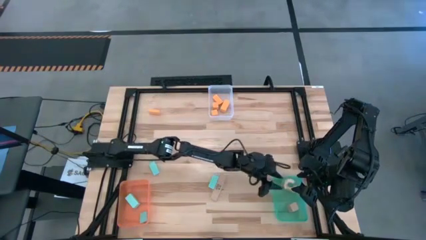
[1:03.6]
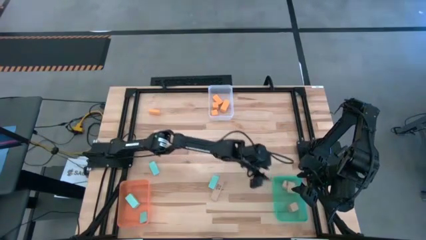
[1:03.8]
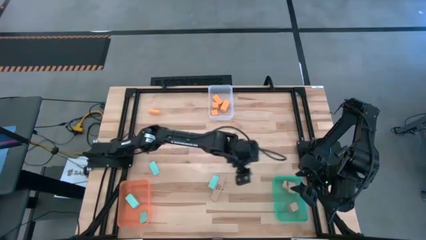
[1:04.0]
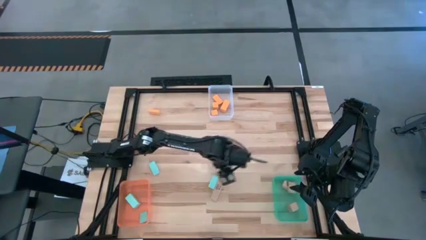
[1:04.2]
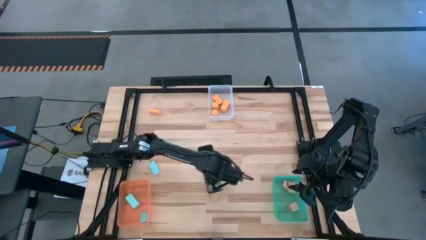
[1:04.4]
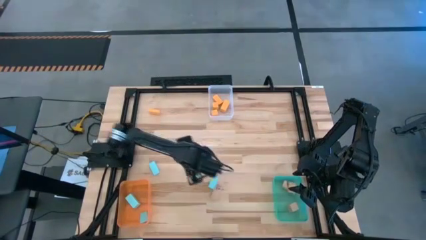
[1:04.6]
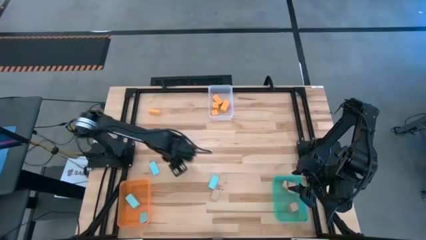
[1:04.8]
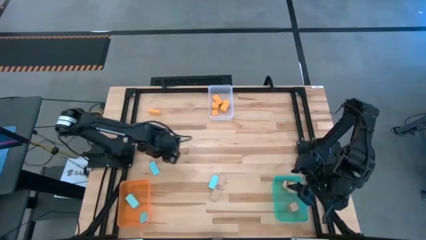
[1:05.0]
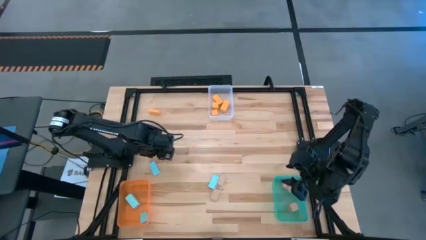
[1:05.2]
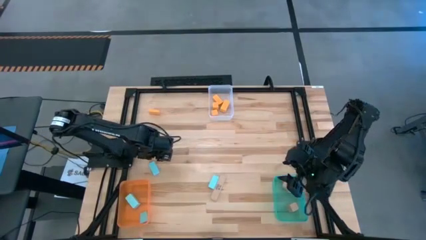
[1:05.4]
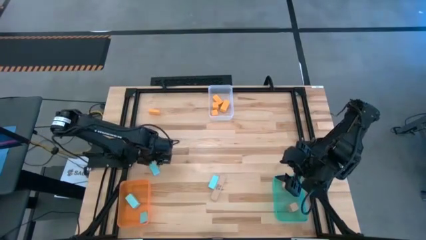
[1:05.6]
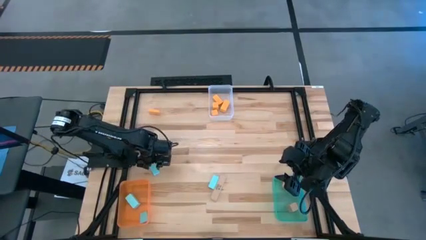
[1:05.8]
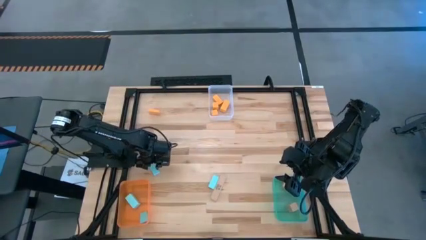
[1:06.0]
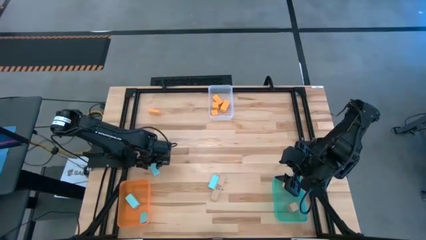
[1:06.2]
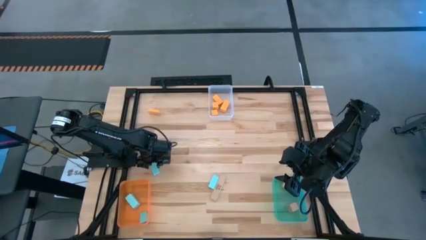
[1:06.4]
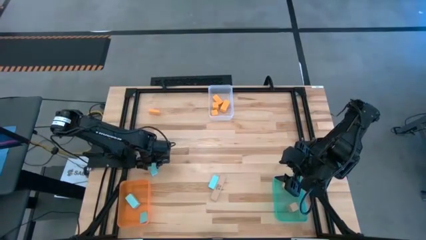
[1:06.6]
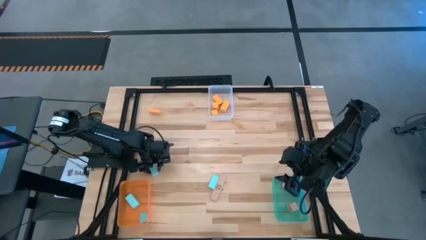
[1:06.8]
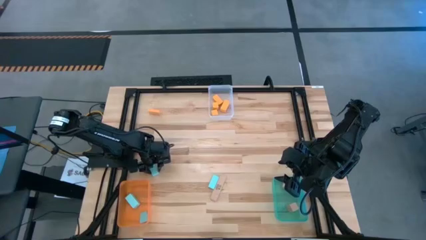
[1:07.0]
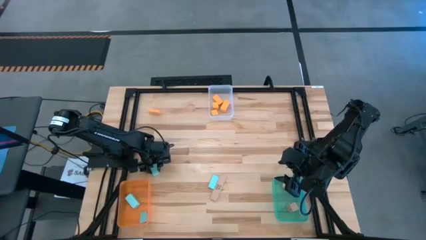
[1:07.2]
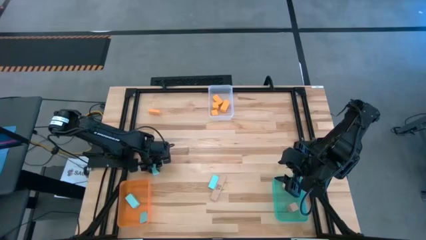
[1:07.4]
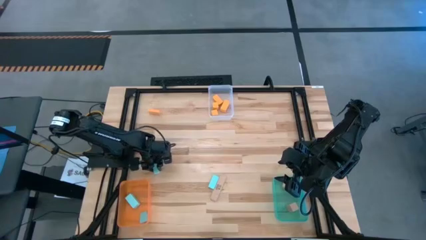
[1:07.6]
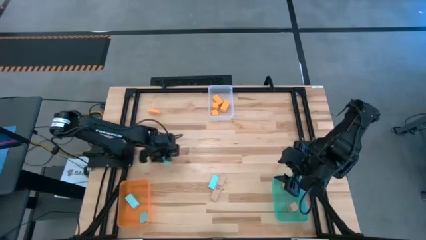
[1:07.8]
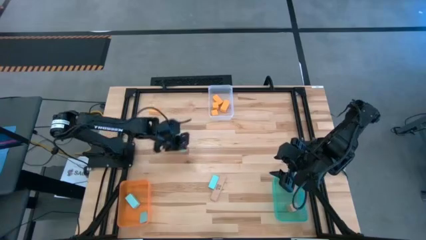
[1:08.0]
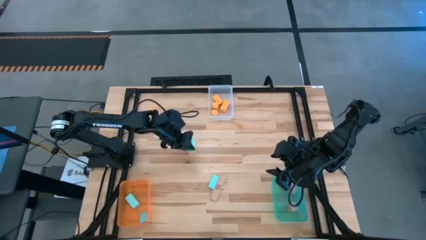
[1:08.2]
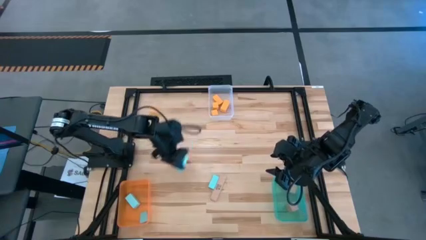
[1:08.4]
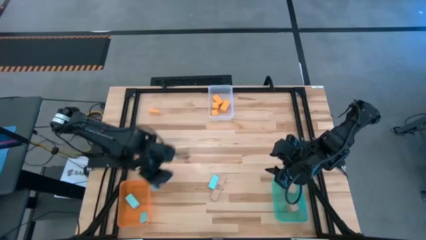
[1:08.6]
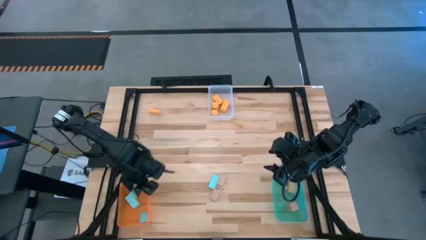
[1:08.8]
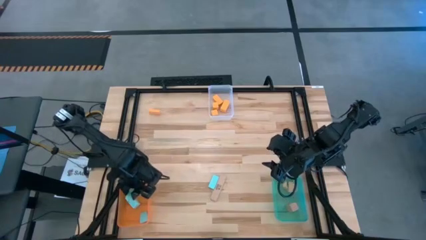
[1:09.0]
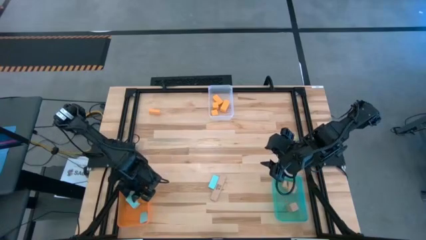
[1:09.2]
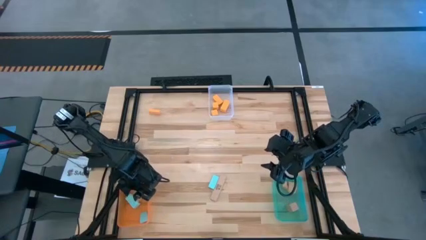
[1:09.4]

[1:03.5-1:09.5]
Task: Sort & place blocks by color
Put the sky blue block into the transparent orange bin

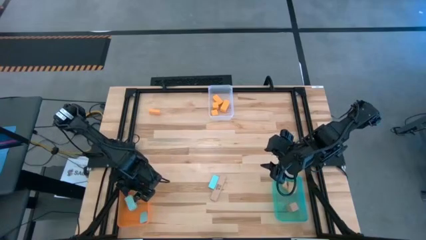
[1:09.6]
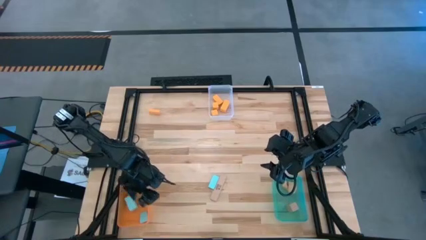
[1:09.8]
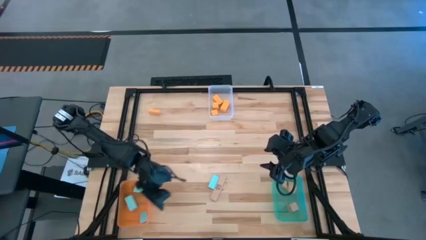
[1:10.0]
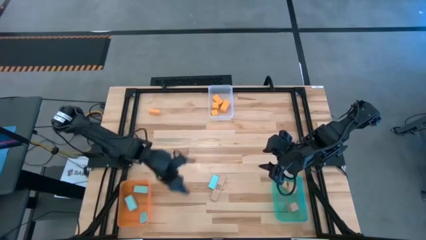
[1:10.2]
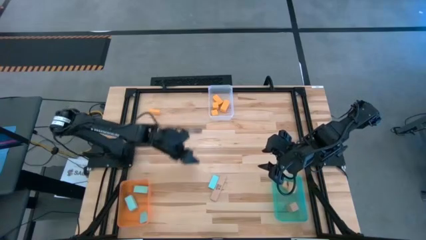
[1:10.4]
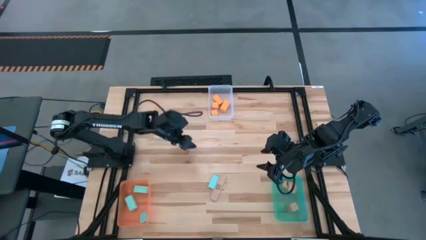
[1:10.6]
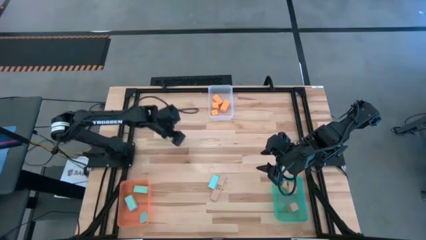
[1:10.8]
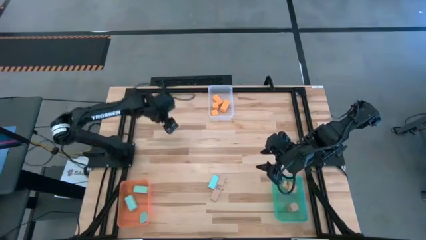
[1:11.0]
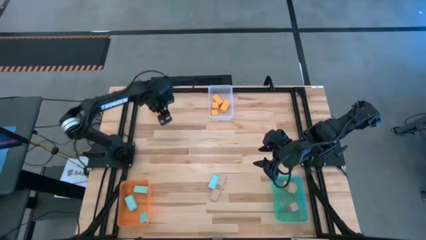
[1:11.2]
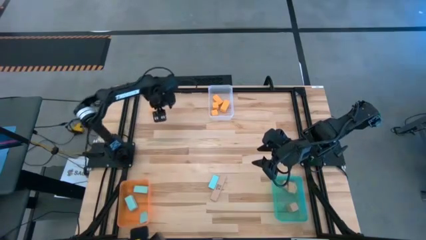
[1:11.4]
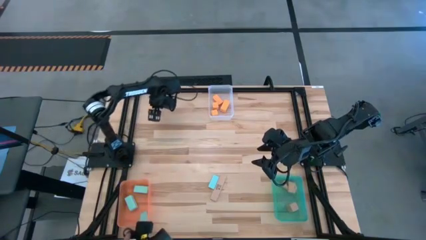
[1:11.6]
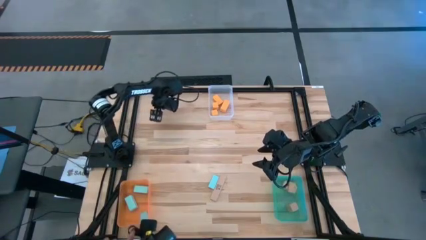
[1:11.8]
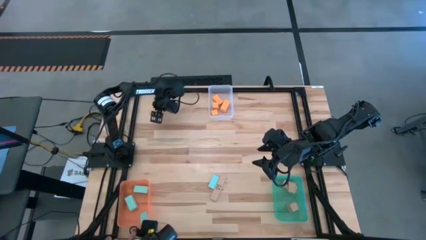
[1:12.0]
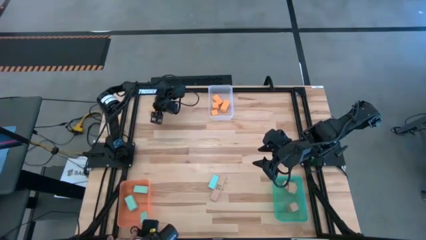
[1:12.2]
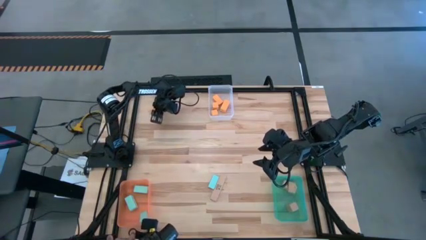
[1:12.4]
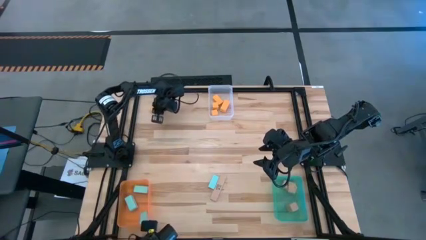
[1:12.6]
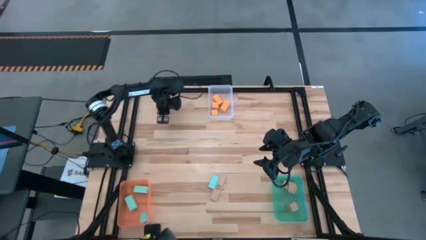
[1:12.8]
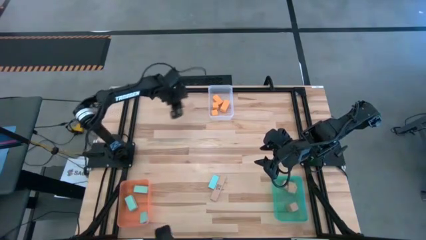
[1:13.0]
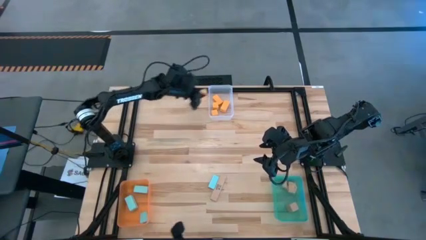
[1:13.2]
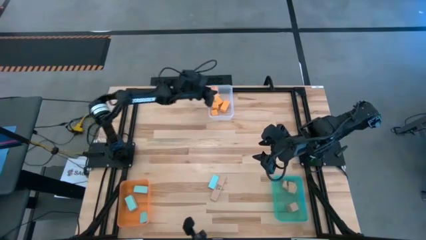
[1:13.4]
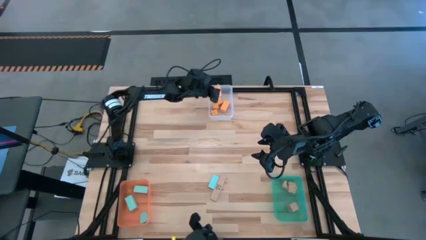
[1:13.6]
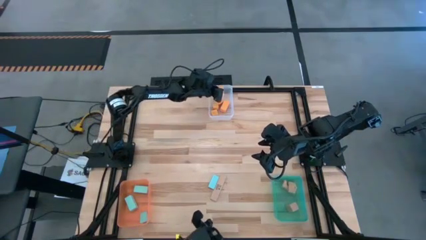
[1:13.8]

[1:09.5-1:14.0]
Put the orange block into the transparent white bin

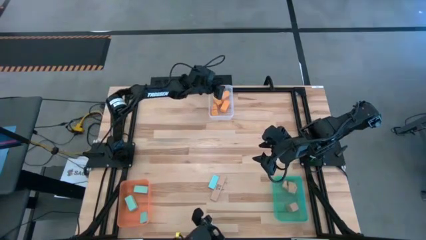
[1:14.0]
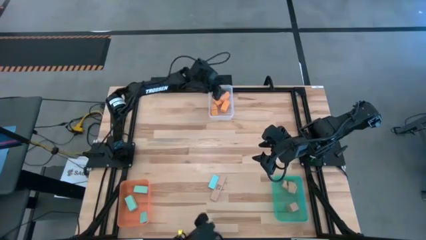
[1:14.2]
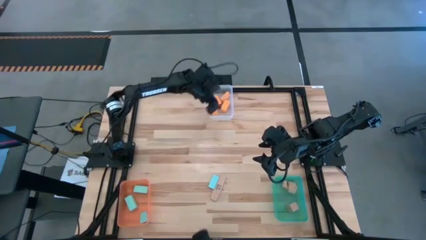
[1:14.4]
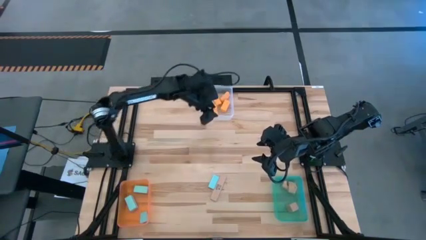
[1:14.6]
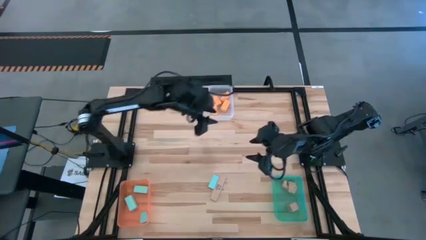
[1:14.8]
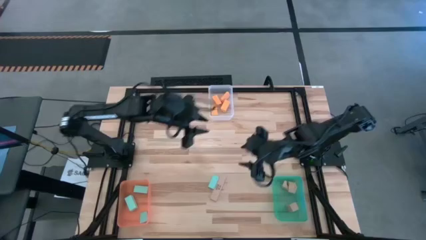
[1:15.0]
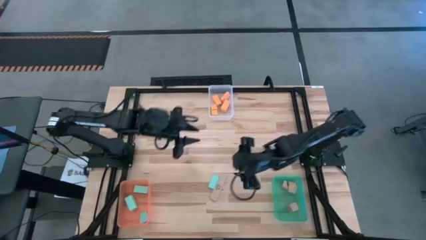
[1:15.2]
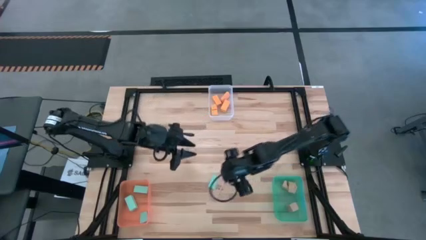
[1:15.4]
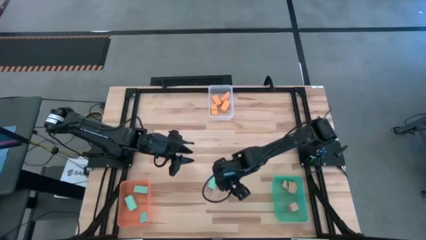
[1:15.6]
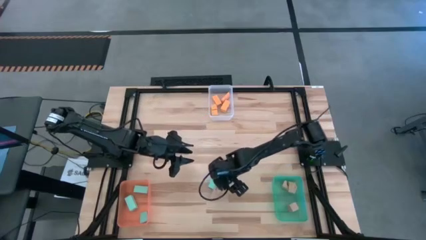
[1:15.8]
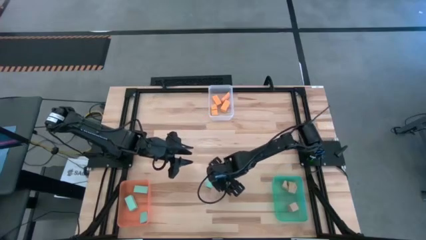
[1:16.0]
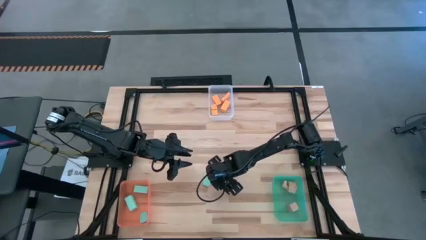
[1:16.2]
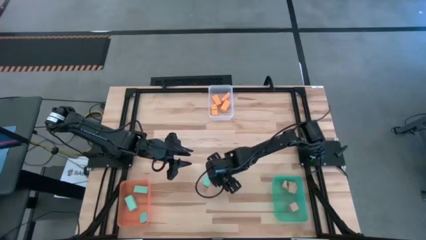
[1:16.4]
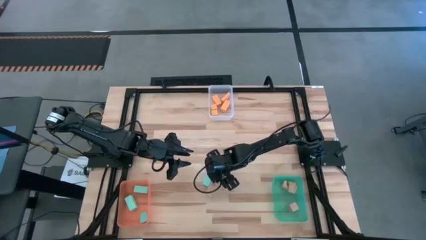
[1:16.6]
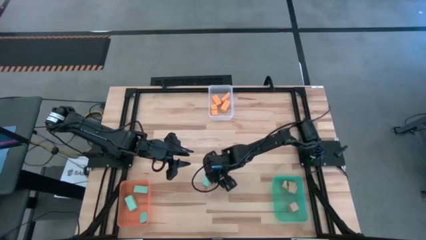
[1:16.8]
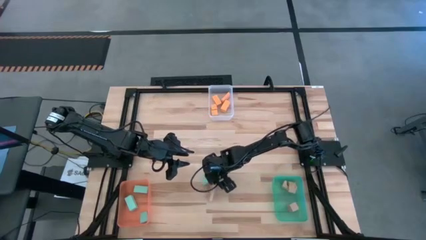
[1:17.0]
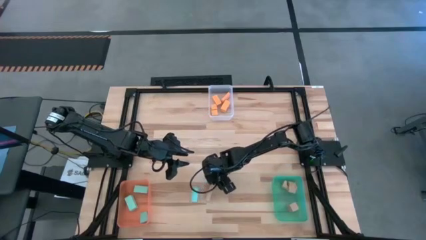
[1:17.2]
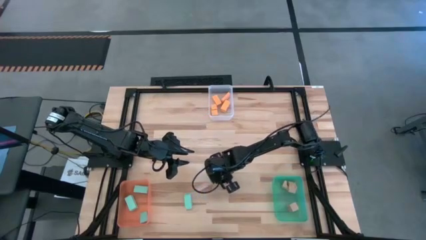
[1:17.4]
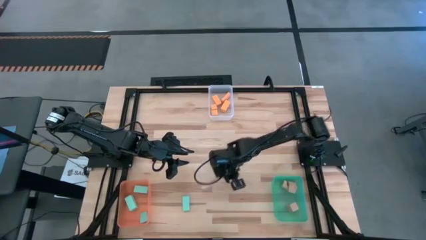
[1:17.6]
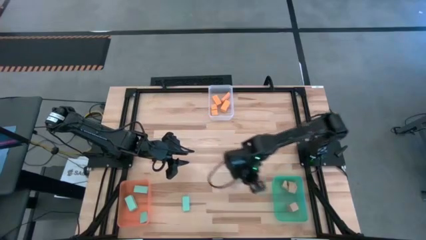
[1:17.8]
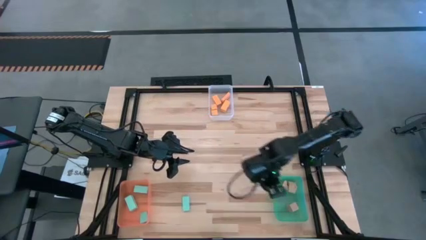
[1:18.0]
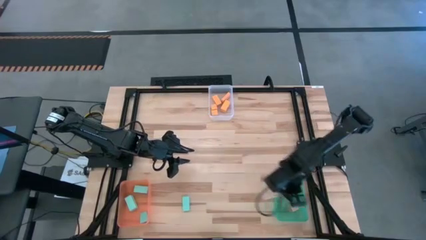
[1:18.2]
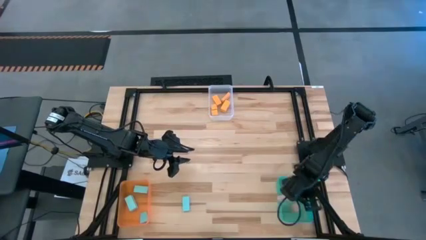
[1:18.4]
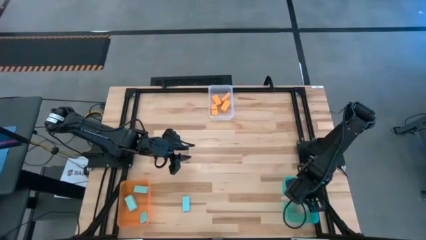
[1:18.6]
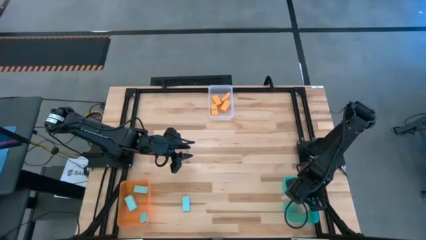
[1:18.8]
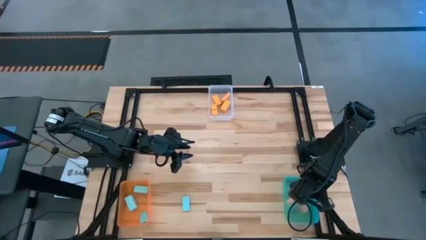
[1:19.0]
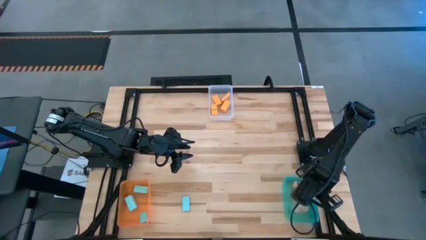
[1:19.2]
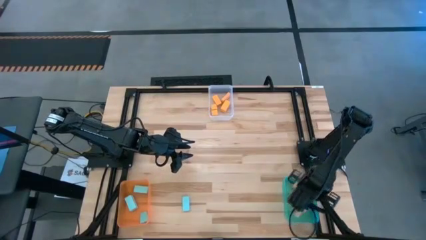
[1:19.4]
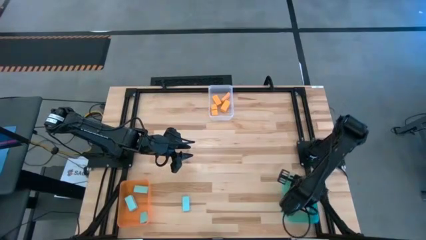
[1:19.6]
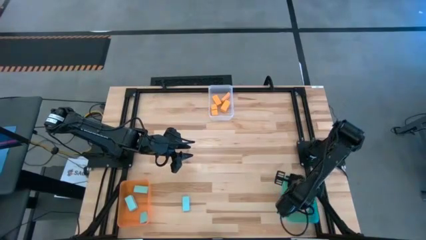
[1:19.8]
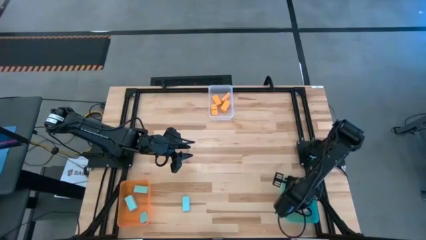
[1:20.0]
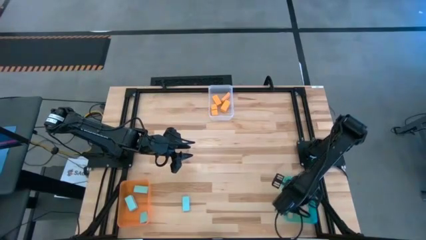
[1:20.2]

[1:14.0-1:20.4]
Put the light brown block into the transparent blue bin
